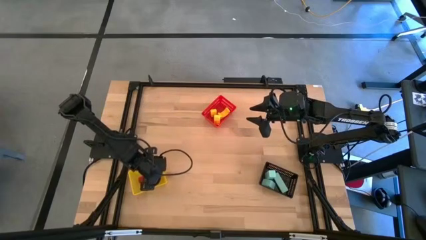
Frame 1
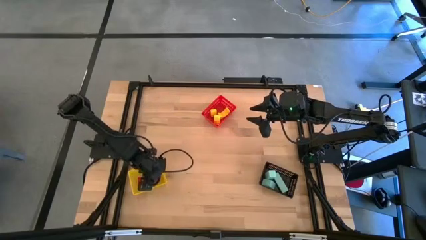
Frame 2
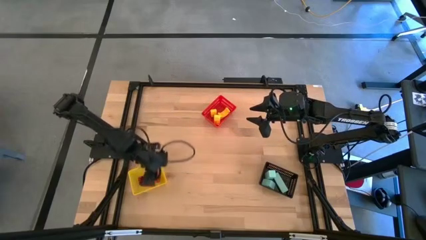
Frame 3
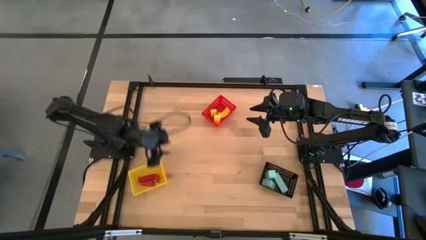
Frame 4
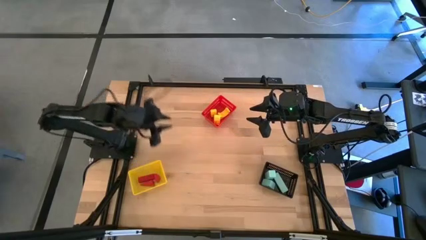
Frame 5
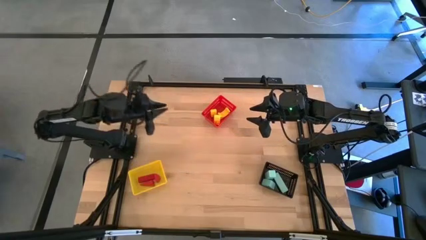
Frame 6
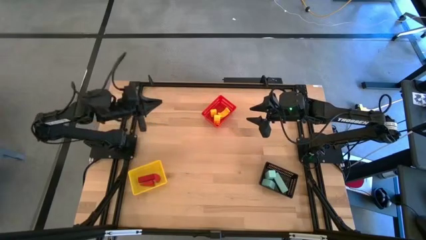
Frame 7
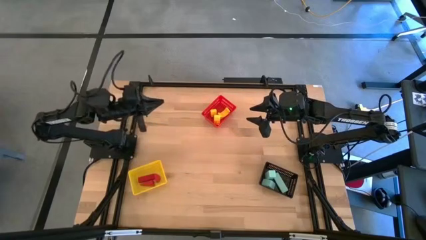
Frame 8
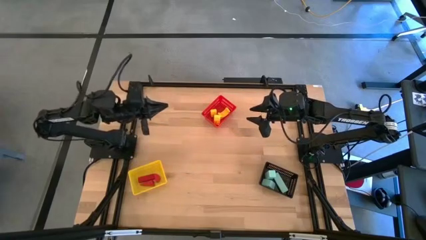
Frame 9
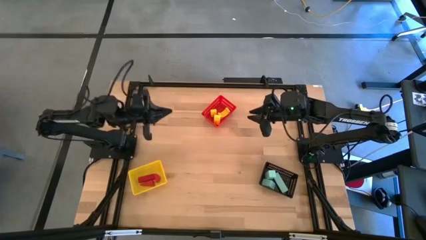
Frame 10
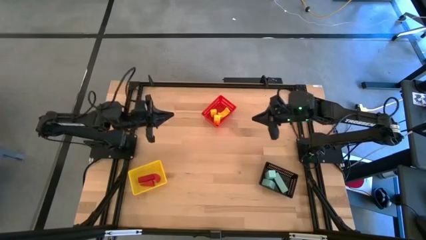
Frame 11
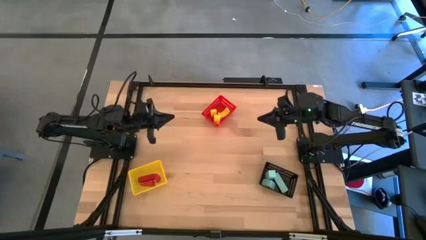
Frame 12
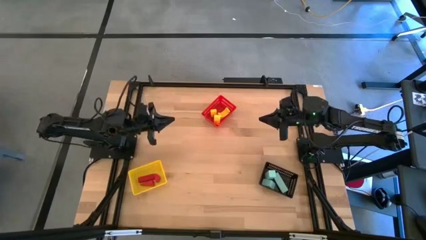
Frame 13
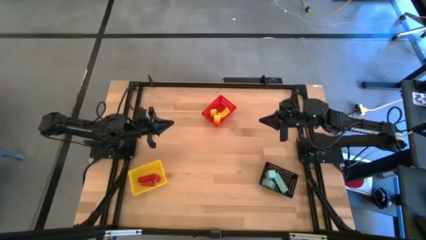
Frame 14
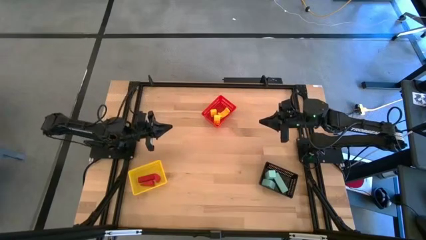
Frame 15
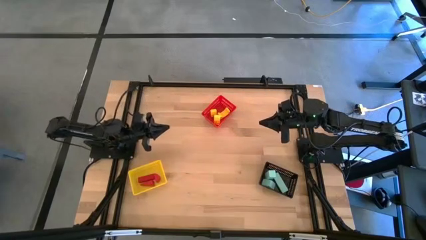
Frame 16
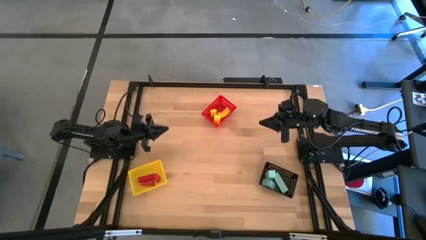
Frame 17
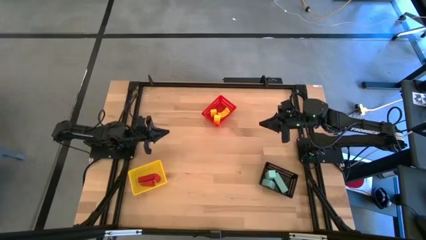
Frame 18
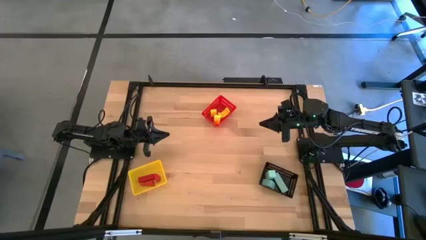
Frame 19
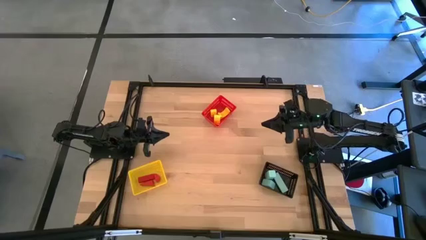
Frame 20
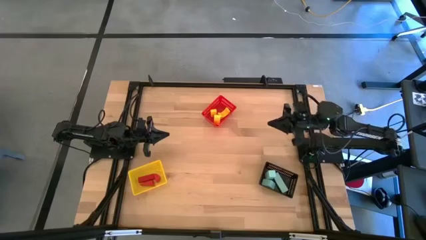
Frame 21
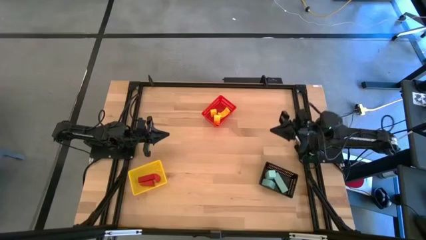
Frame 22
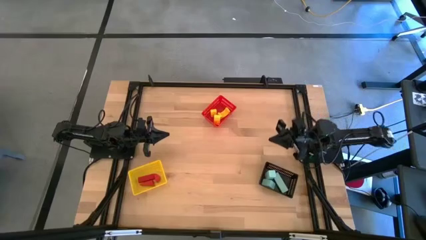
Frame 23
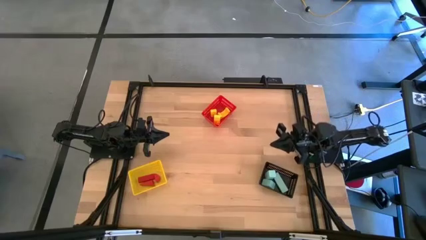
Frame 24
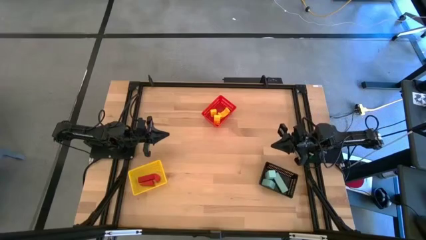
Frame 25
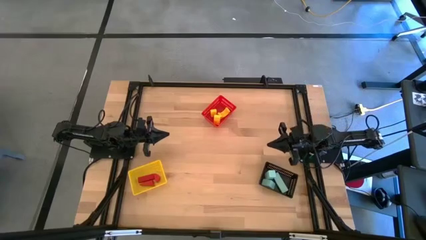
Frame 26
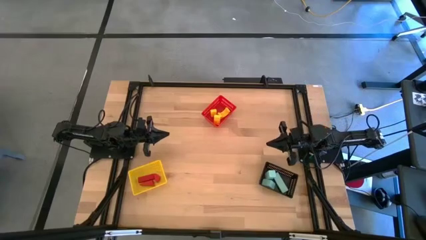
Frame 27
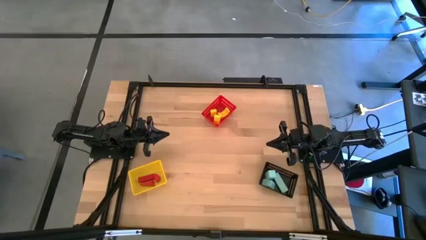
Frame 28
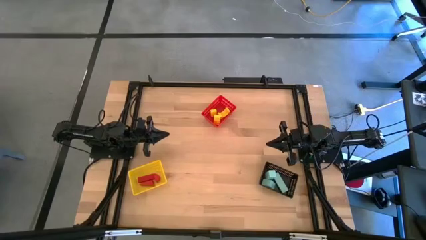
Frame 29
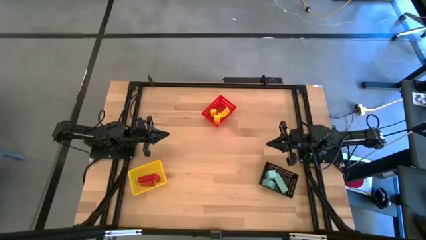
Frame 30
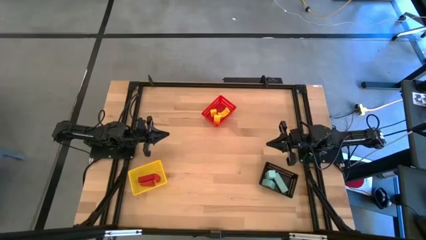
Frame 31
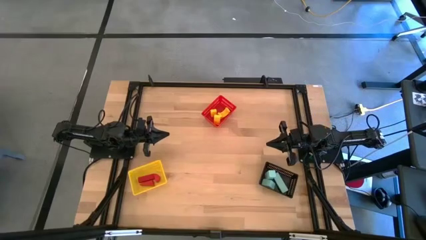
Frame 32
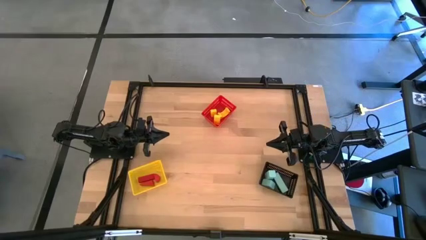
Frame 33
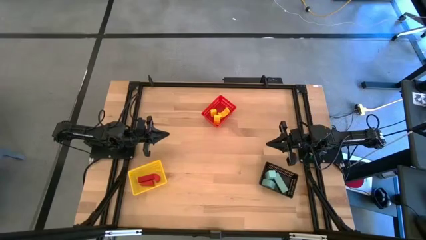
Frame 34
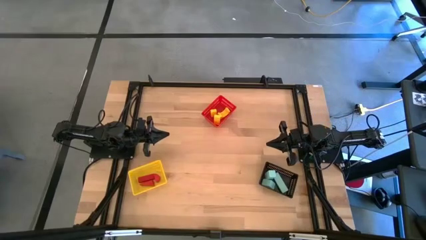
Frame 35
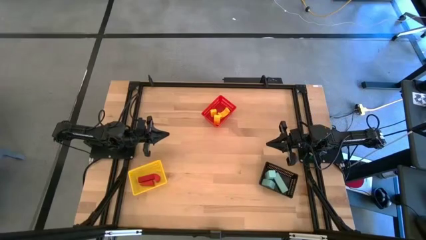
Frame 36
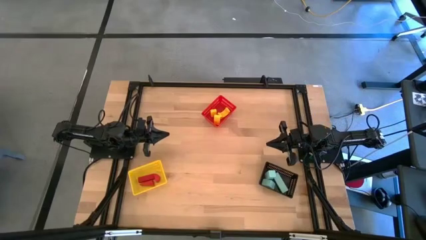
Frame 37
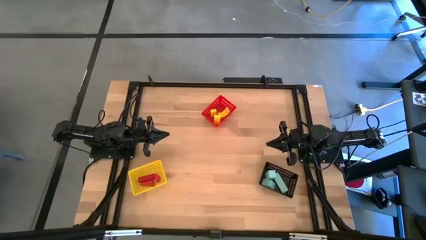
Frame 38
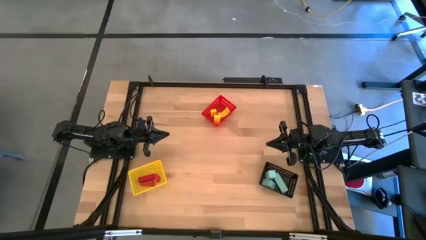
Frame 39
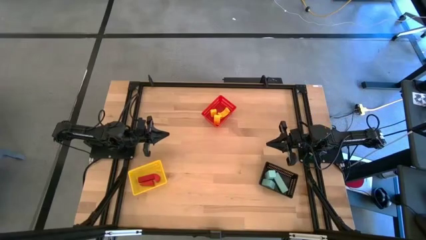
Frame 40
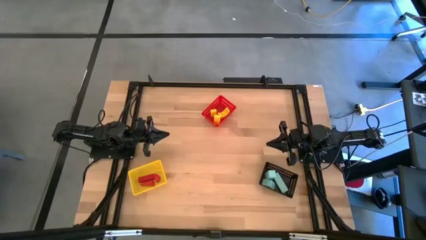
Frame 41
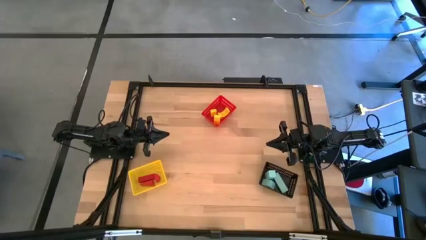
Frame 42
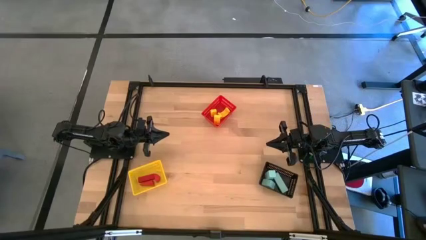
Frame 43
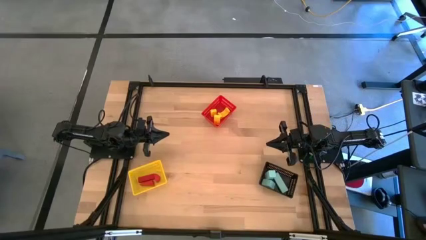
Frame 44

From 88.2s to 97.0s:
Task: Sort & place blocks by color
Return to Home Position

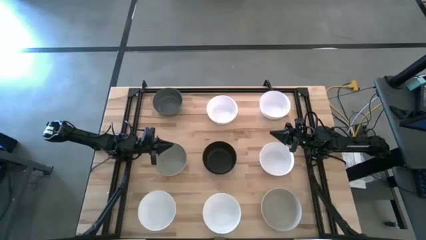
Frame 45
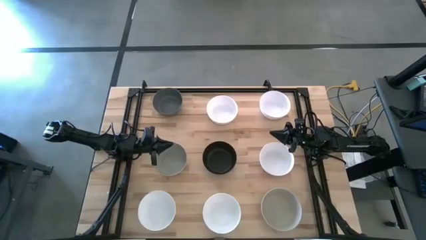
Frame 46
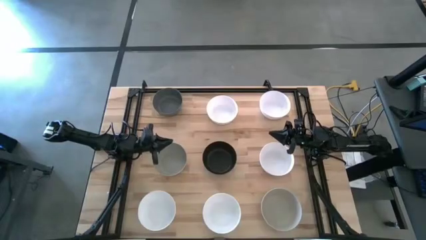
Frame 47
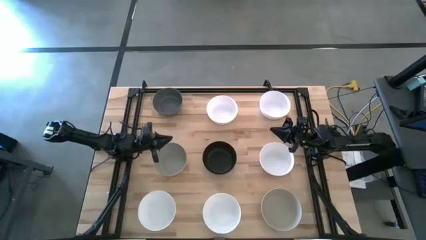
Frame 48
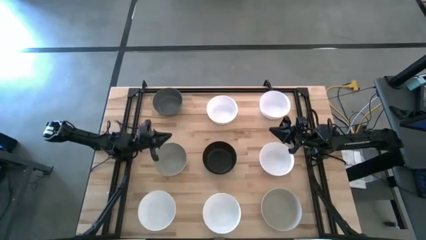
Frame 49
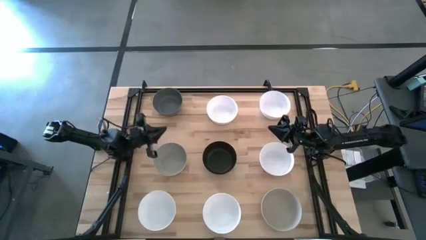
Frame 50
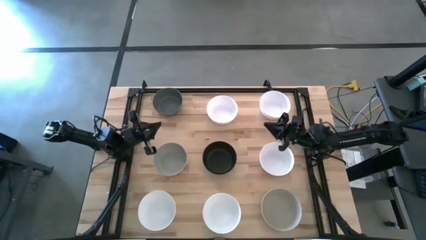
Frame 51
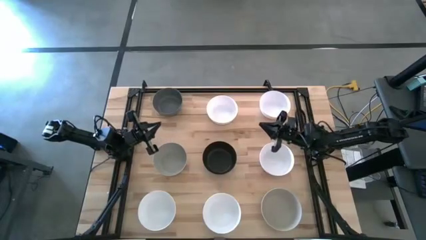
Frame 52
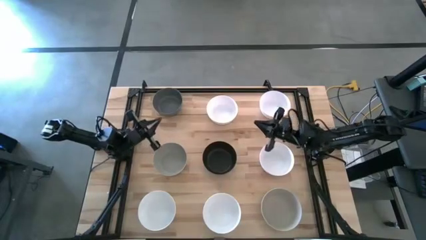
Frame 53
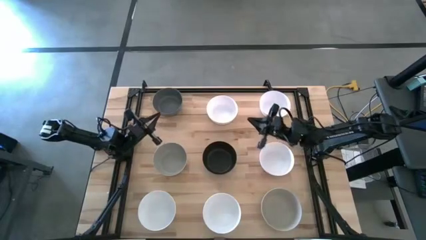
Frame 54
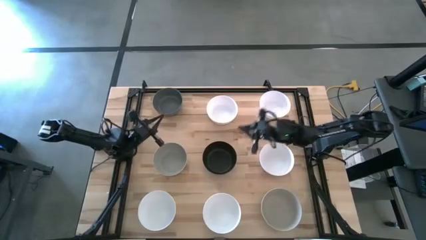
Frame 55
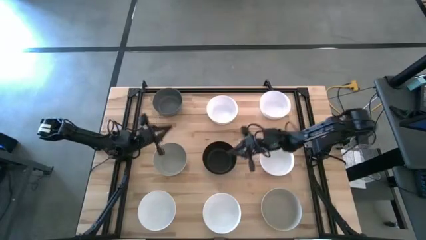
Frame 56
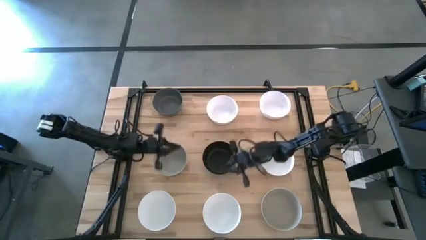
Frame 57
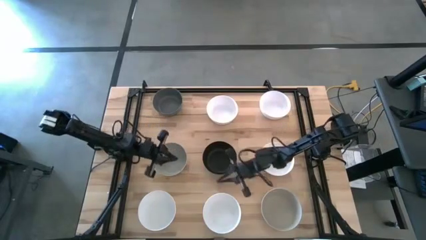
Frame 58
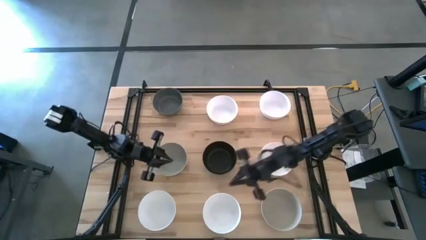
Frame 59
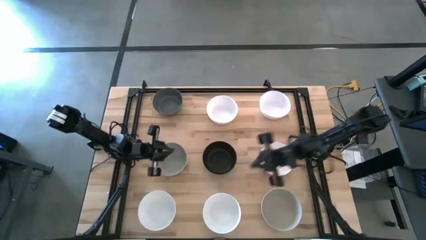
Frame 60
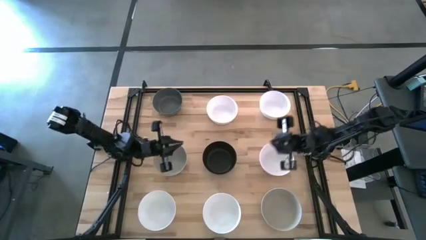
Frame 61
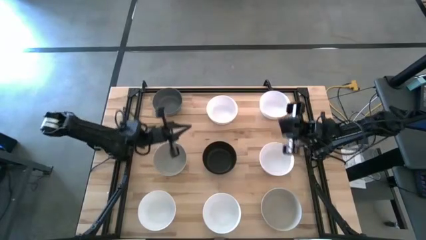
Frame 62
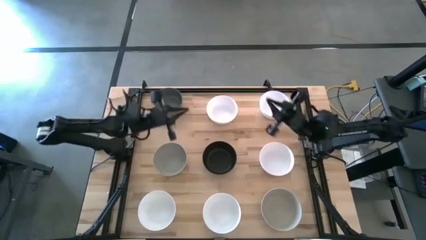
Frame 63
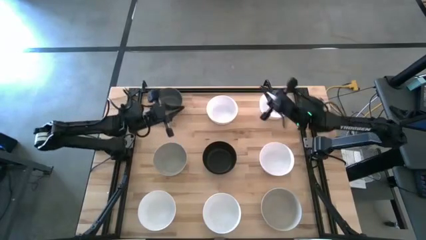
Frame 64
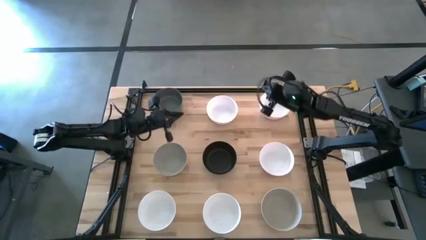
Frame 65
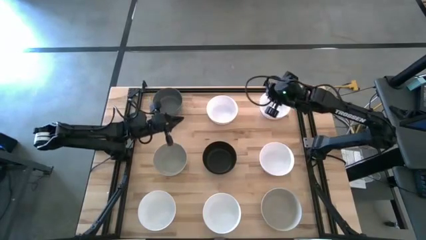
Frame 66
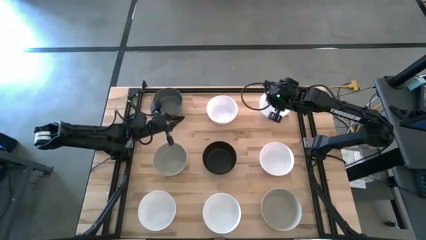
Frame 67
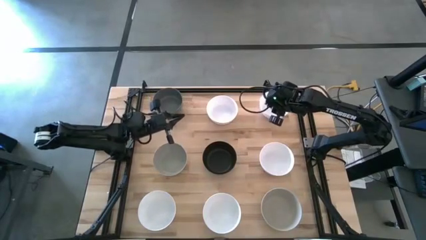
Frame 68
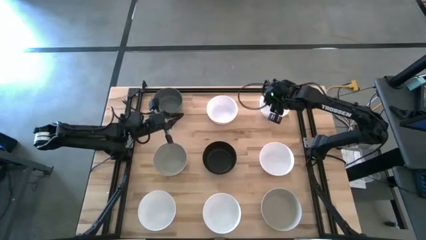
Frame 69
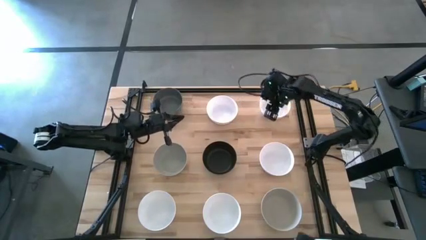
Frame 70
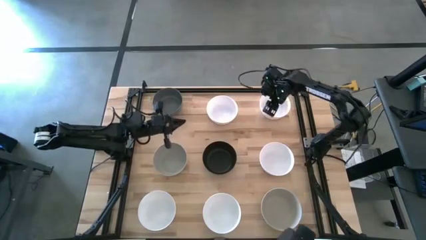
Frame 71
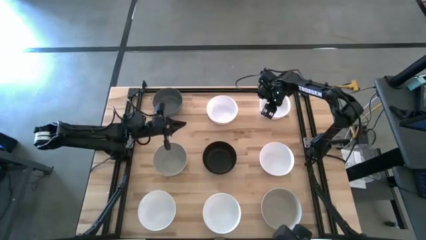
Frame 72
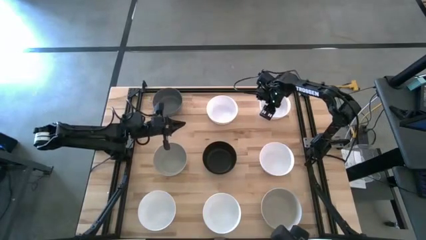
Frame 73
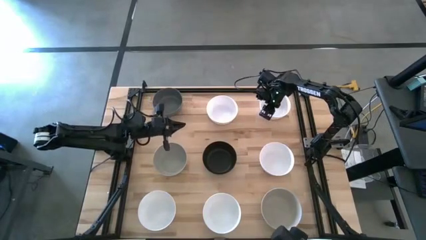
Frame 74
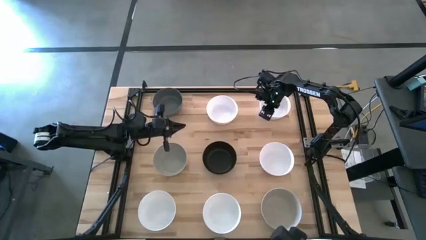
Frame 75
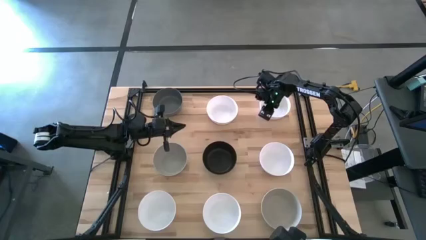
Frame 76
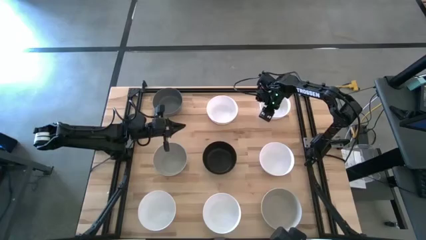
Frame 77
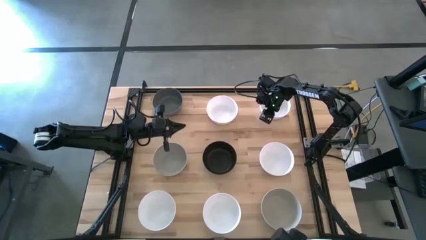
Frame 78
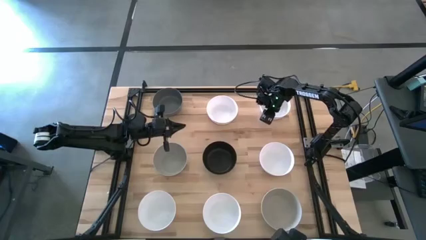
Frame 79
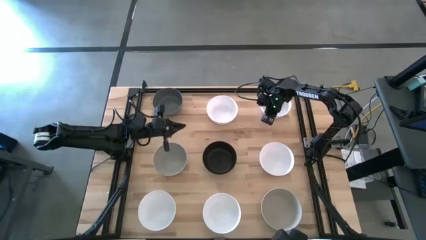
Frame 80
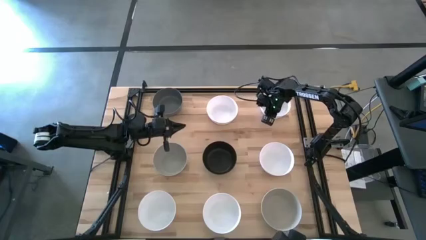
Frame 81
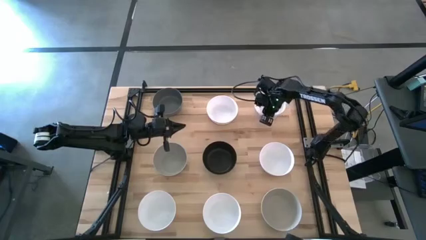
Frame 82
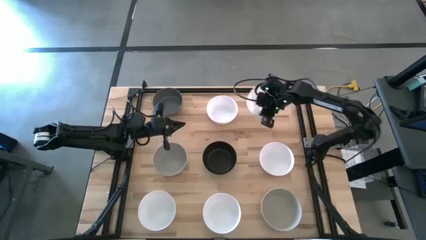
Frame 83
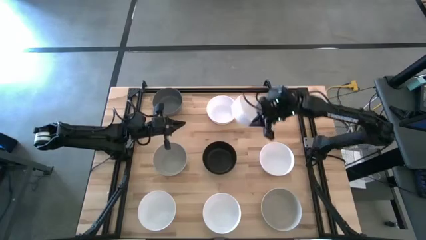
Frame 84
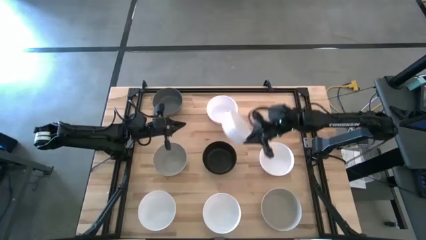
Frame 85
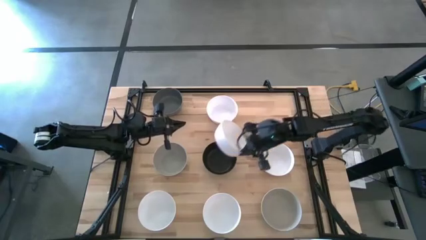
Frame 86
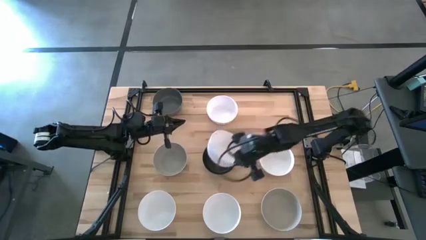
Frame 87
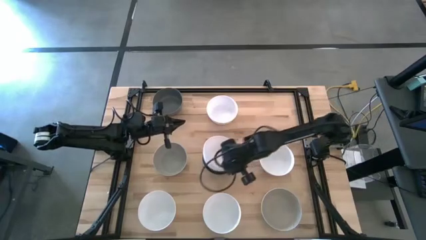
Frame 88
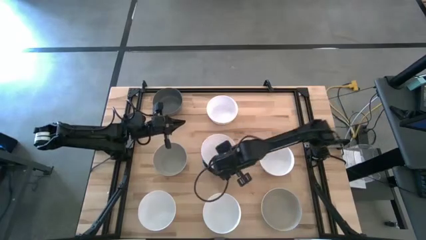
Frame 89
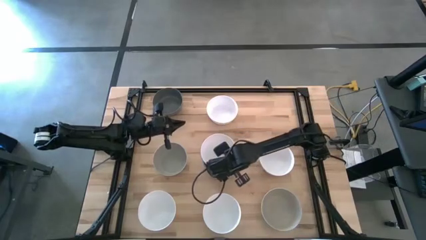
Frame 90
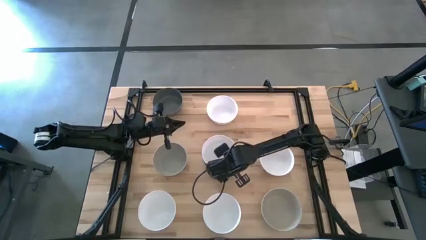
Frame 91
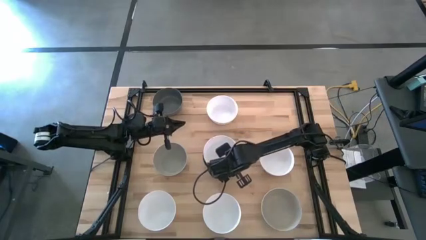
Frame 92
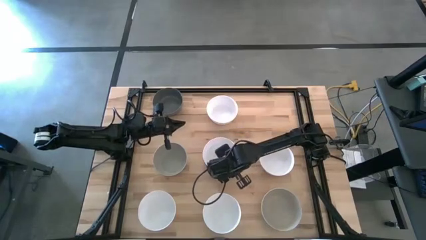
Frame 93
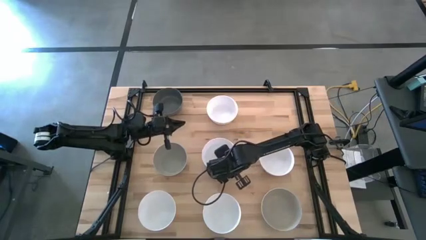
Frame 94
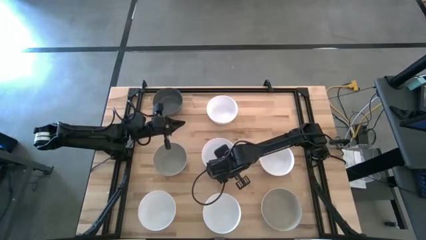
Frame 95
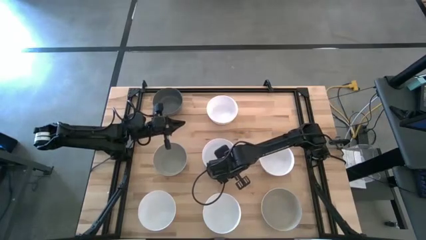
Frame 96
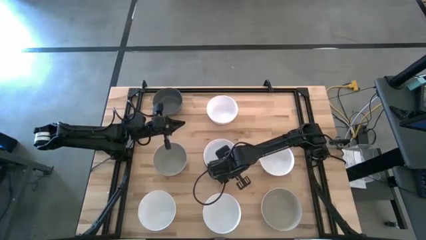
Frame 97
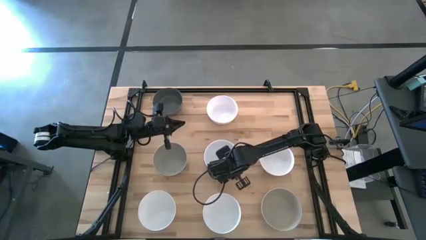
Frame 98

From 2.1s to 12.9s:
Task: Nest bowls inside each other
Stack the white bowl on top of the black bowl
